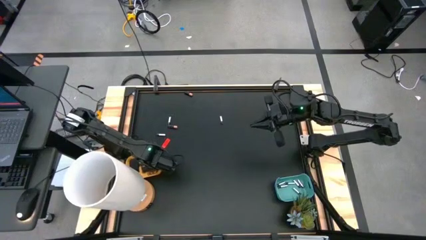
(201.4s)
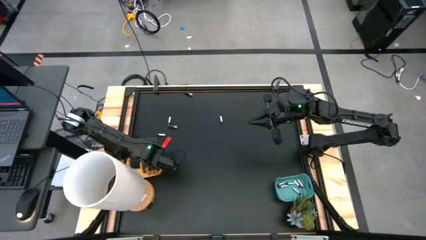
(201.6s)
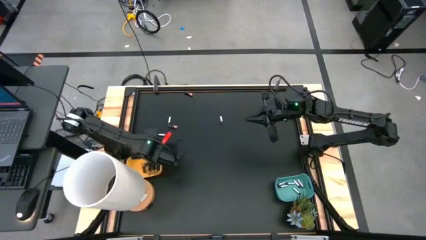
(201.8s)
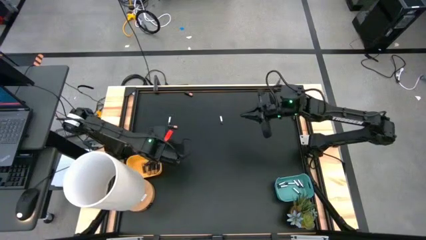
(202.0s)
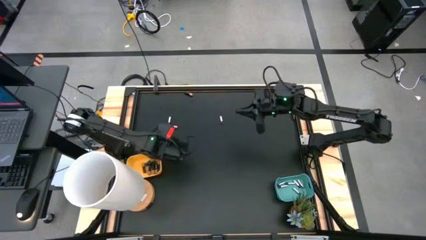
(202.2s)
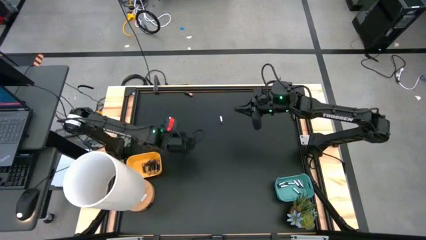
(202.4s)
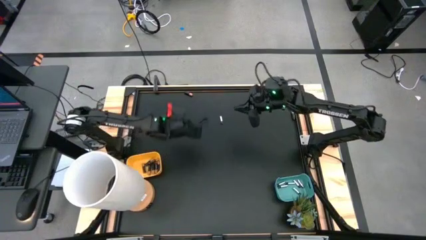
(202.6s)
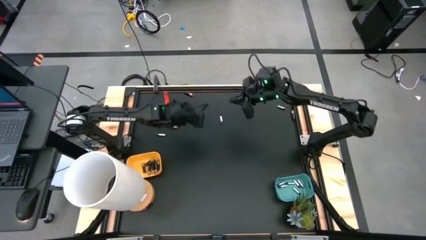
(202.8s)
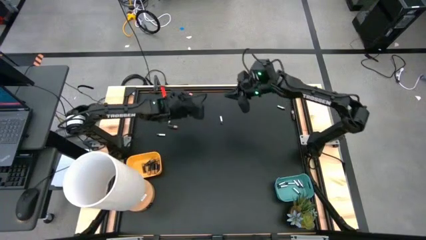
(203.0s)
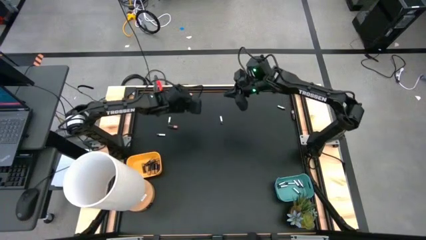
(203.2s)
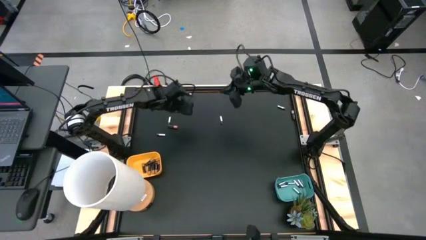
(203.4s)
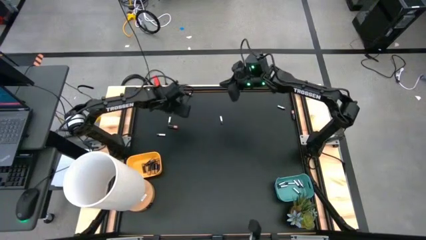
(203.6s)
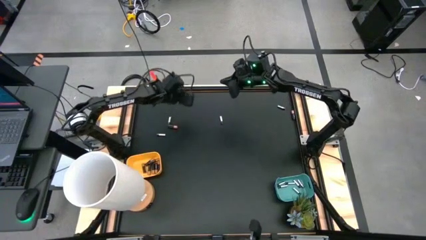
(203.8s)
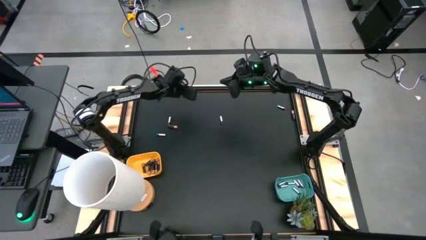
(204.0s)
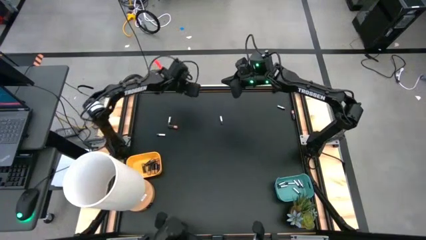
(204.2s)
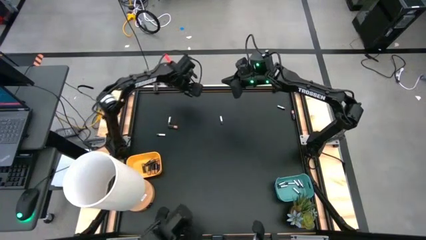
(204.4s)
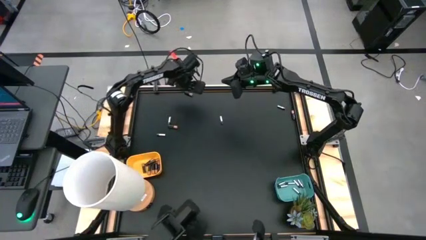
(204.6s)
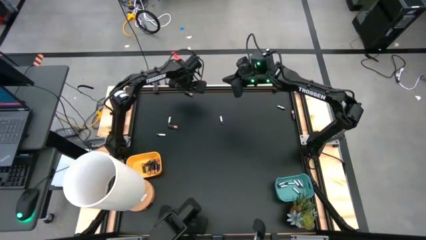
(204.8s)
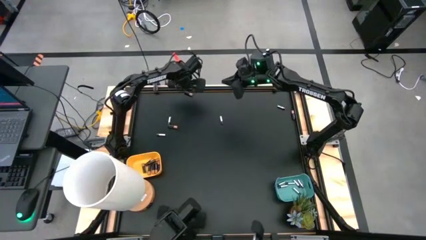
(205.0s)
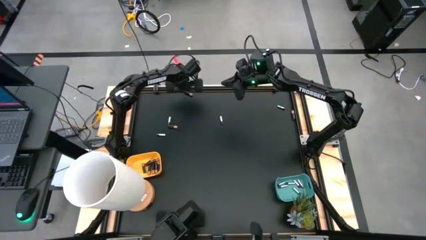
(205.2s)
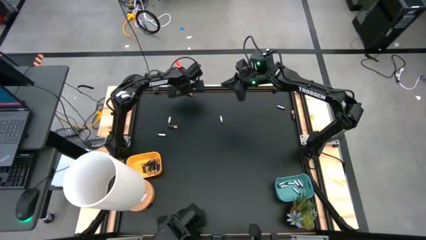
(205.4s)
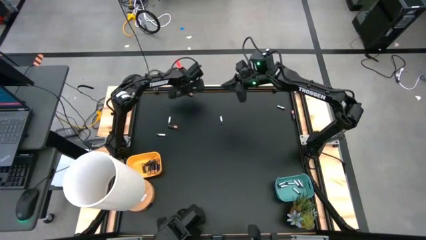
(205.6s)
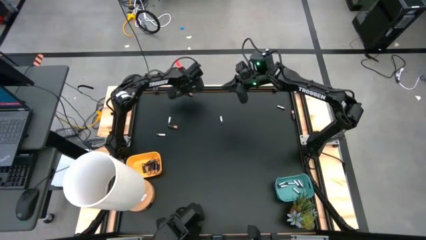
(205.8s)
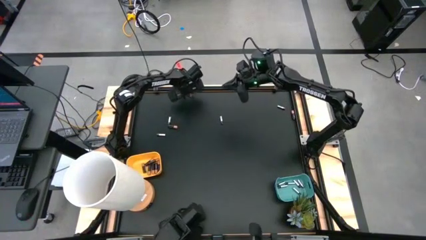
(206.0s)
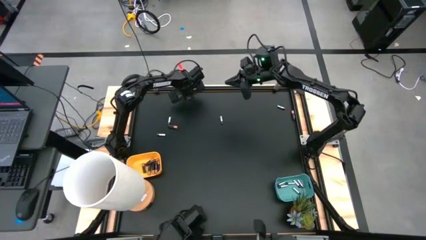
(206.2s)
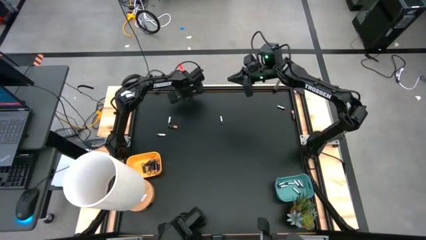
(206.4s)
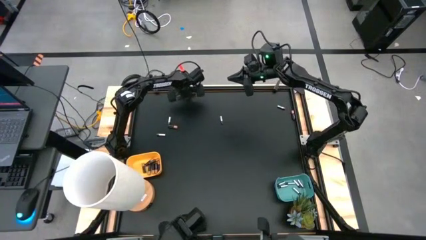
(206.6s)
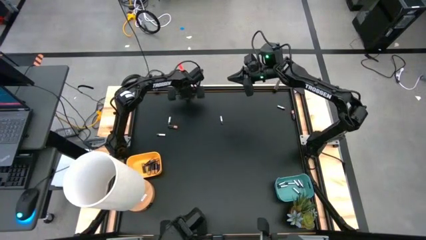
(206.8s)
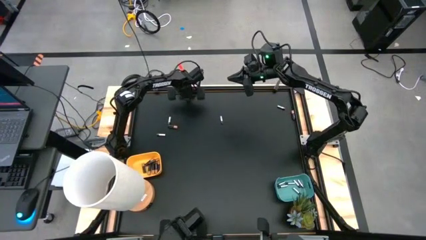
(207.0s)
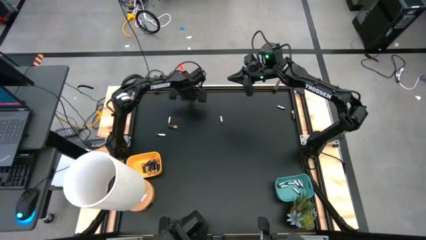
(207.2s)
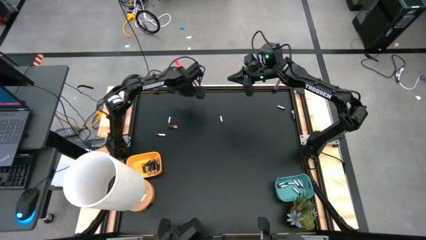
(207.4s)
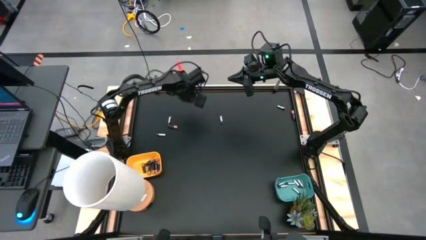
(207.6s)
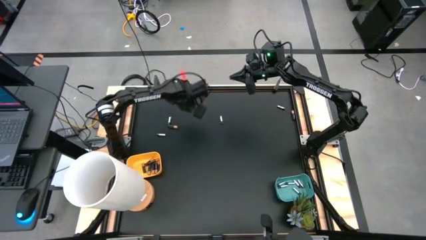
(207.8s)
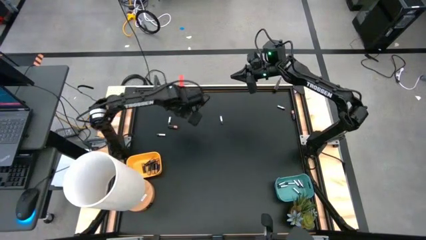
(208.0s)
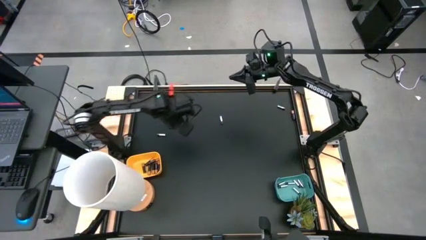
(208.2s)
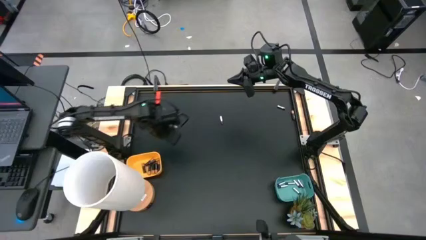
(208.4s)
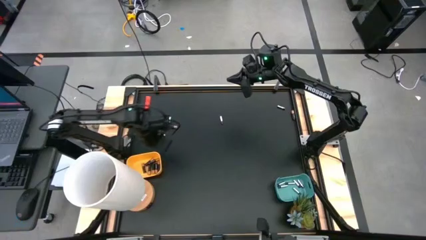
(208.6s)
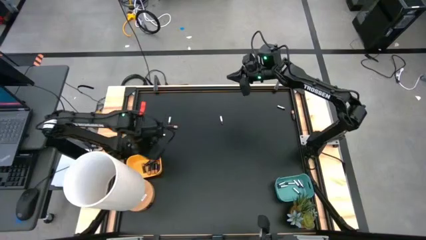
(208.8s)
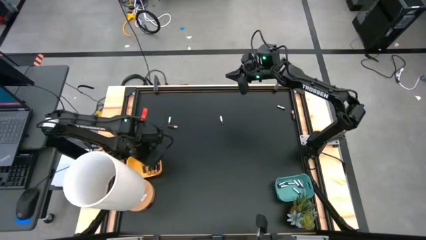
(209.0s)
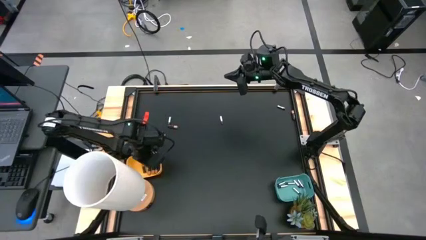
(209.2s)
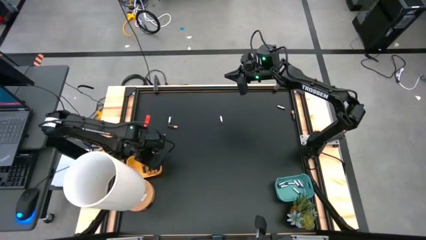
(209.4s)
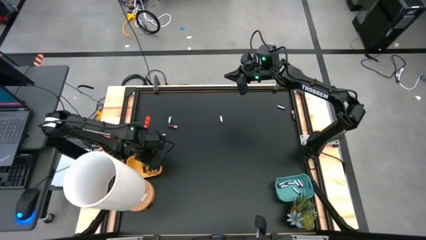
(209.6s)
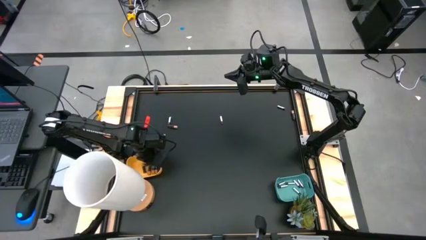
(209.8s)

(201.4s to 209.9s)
Task: Sort batteries
Put the black battery into the yellow bin

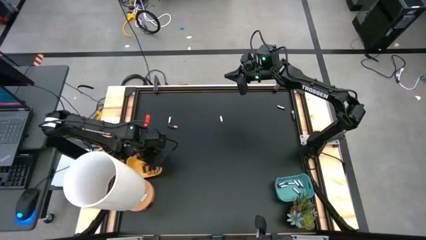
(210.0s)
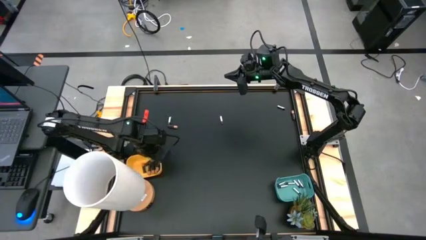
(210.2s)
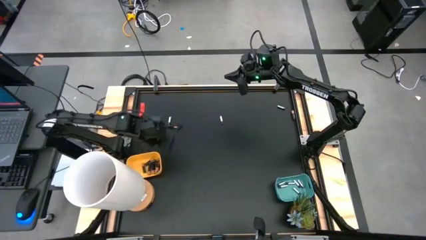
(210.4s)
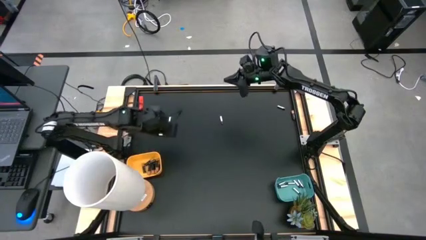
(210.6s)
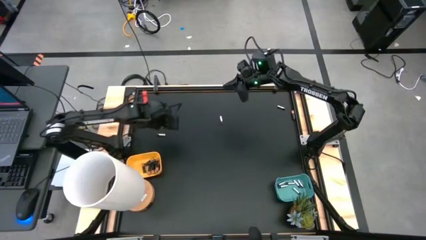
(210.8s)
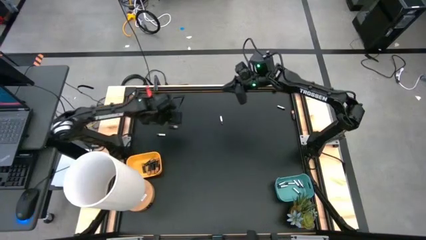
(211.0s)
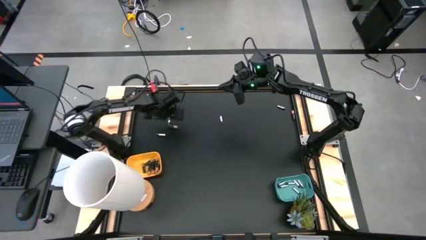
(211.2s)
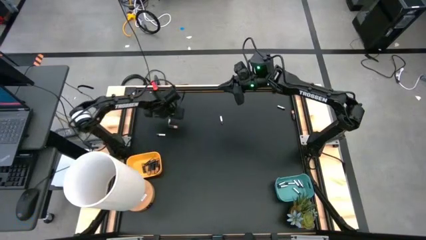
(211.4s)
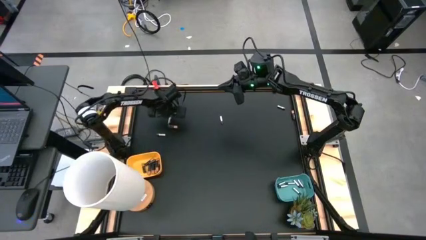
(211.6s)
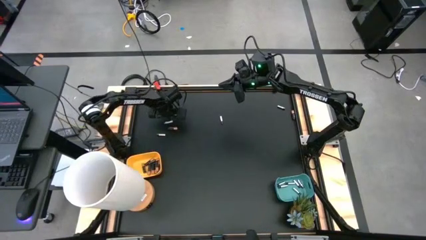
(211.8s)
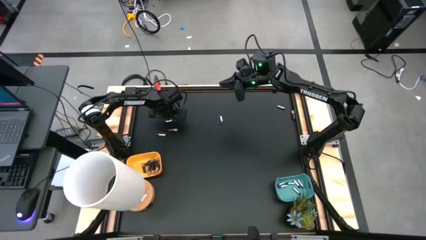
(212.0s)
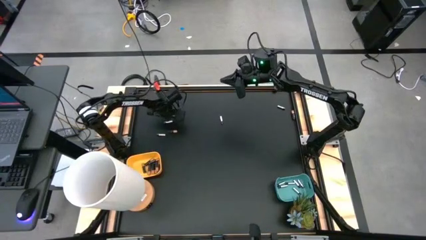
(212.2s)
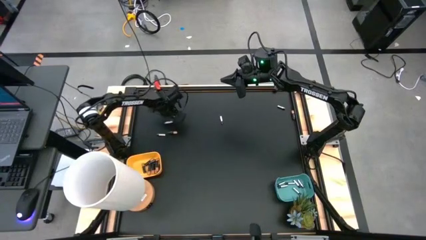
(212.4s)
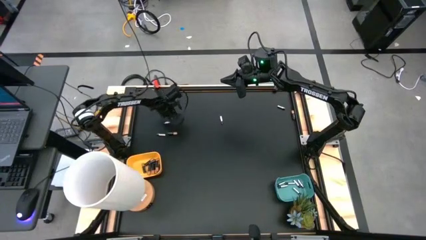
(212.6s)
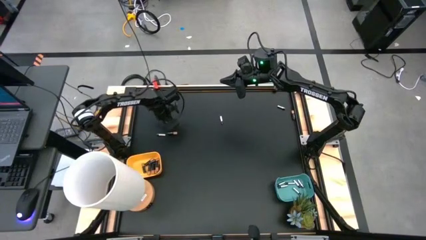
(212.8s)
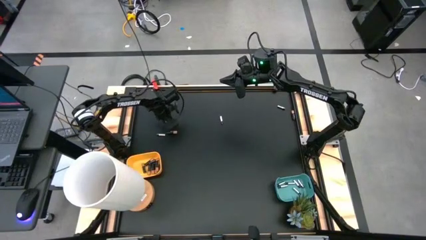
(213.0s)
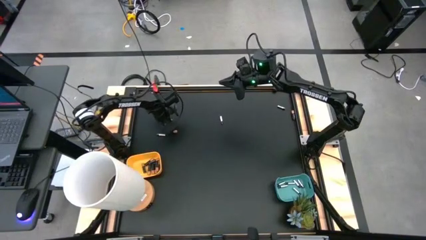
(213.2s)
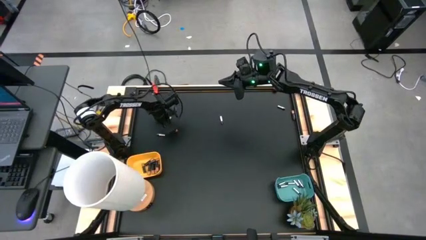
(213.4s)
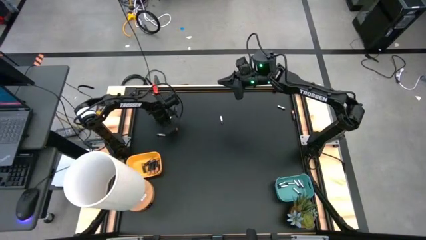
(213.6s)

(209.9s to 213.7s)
Put the silver battery into the green bin

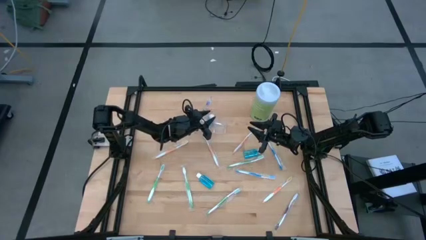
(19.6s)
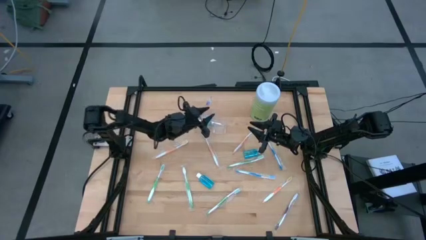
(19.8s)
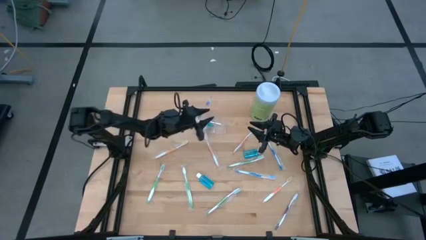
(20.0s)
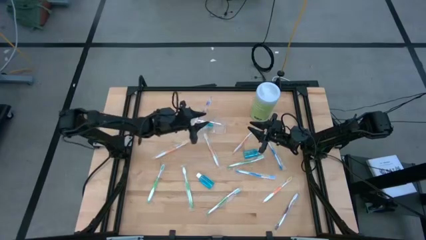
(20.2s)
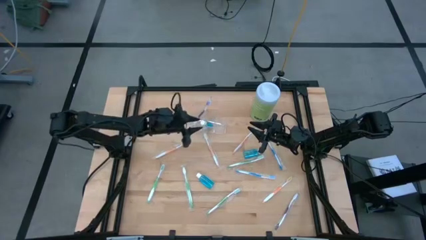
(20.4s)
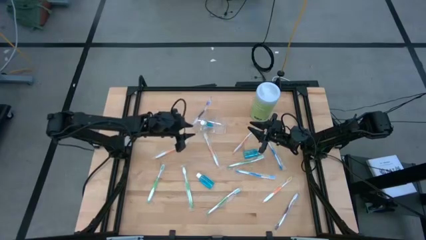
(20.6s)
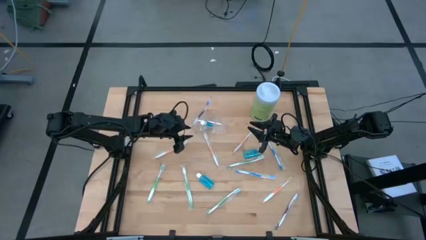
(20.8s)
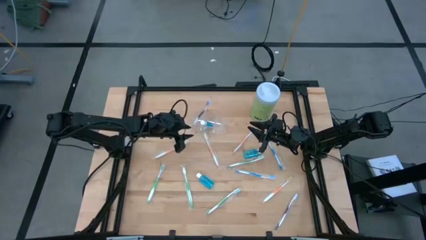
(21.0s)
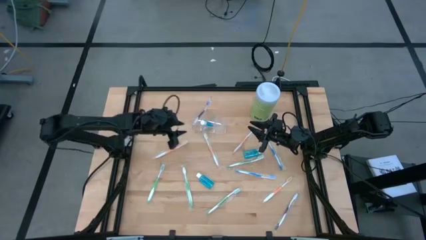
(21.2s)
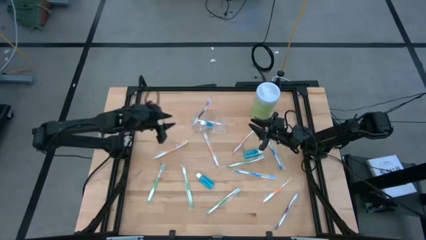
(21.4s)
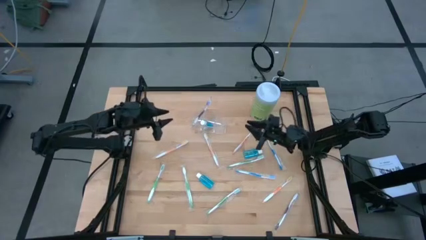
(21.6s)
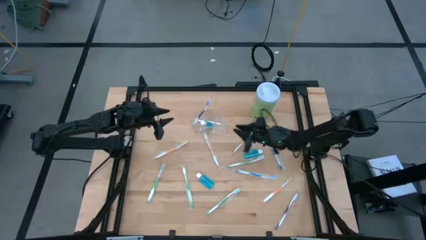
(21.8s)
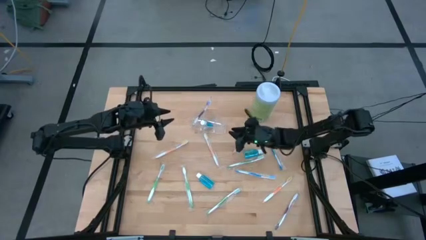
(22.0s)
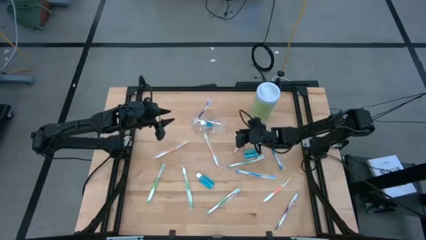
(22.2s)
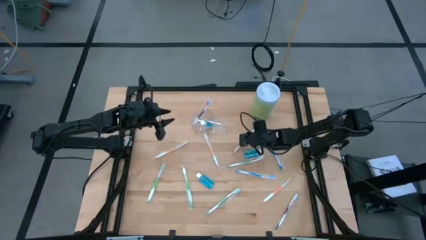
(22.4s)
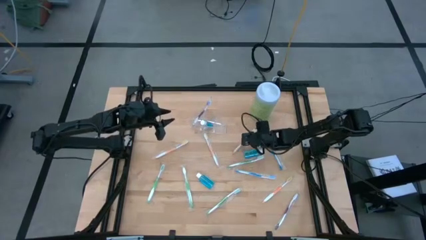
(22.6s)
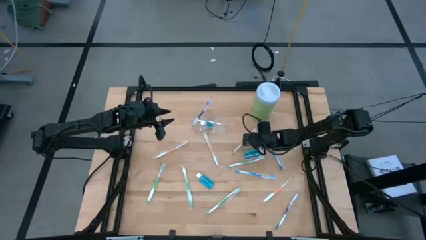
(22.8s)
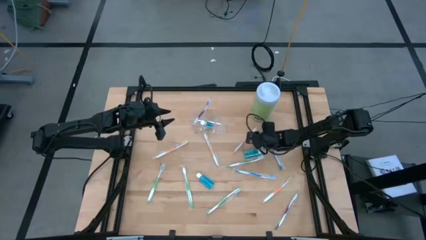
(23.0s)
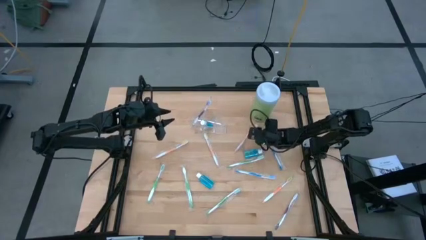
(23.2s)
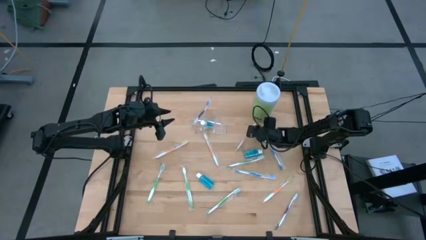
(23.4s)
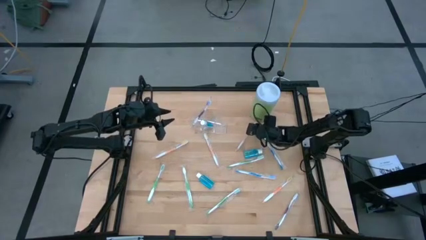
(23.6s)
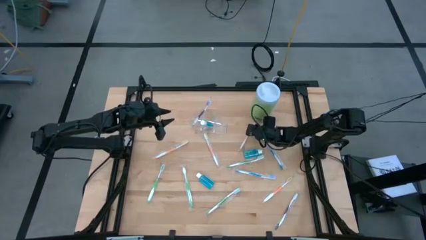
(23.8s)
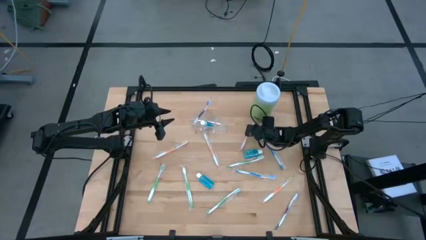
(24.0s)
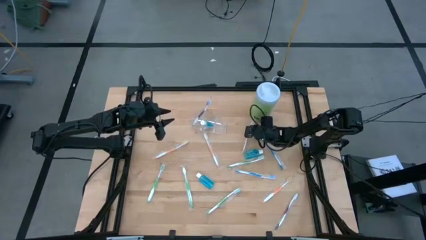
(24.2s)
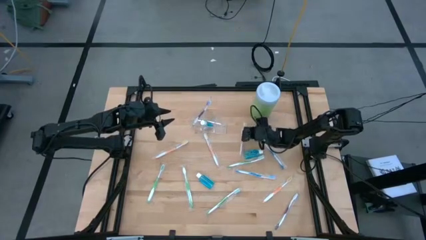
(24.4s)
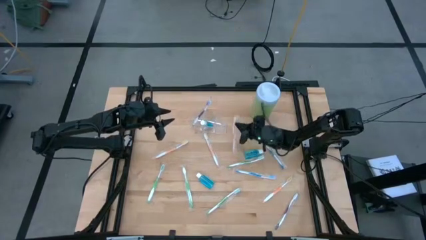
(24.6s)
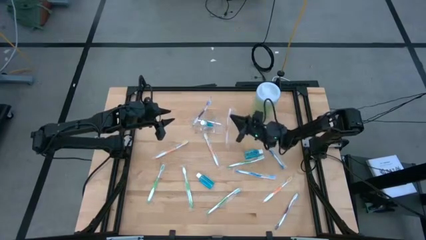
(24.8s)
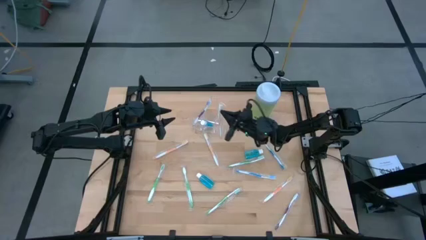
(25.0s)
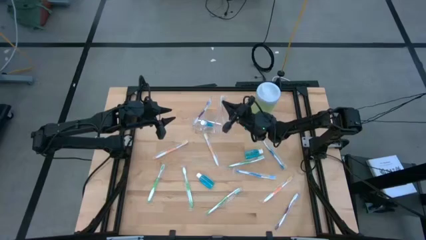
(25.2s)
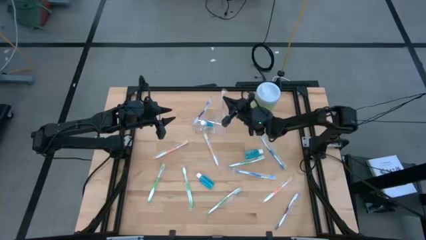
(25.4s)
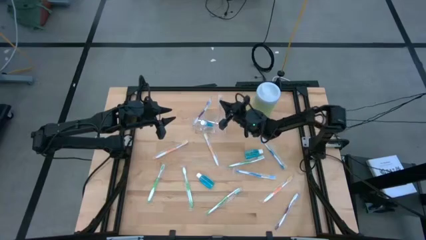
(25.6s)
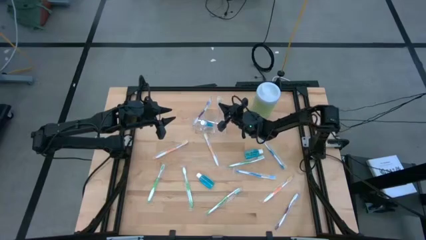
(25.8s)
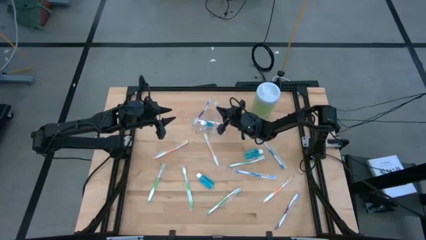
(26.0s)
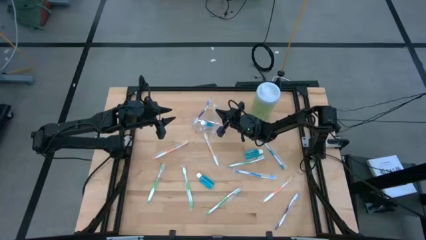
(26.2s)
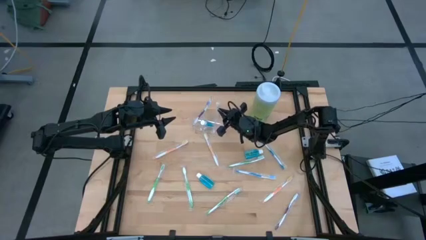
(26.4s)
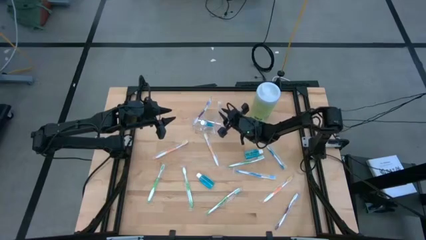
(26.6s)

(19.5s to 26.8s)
Task: Pick & Place toothbrushing station
Put the orange toothbrush into the transparent organizer
